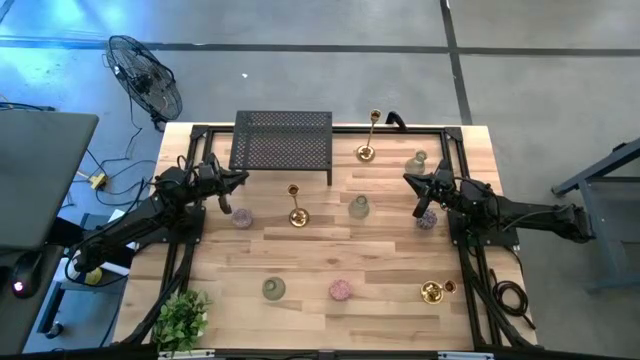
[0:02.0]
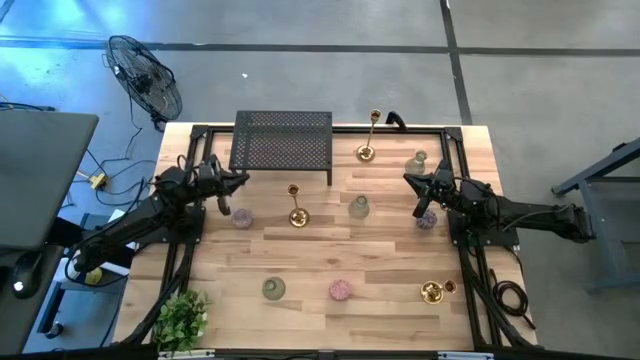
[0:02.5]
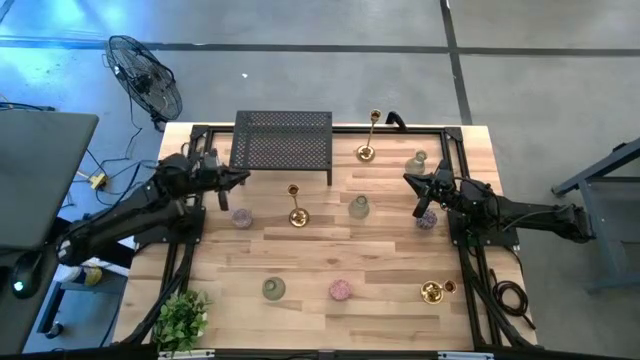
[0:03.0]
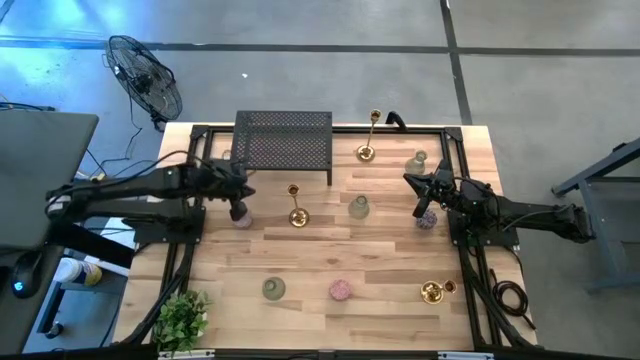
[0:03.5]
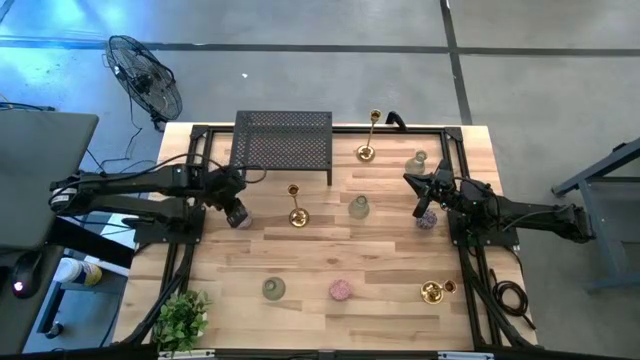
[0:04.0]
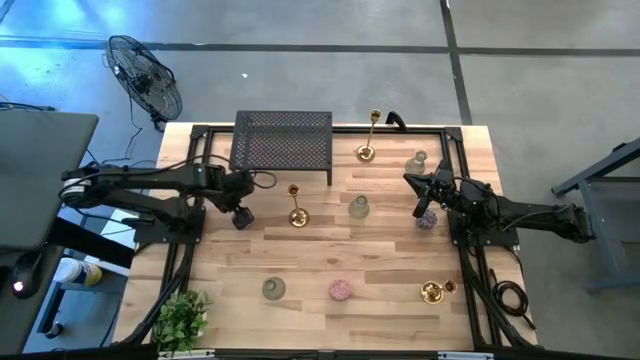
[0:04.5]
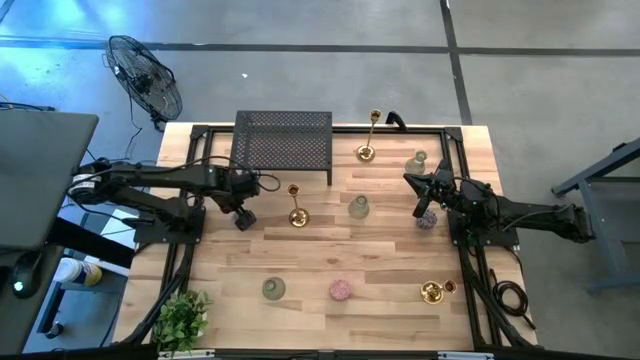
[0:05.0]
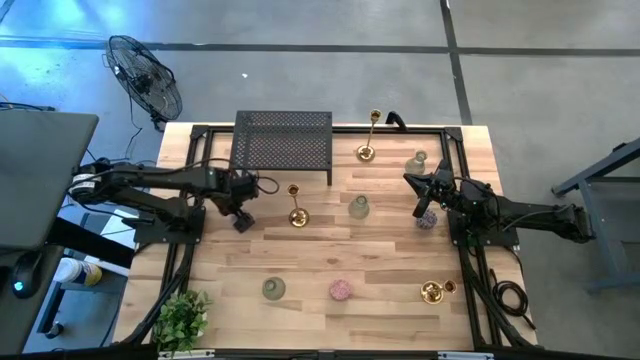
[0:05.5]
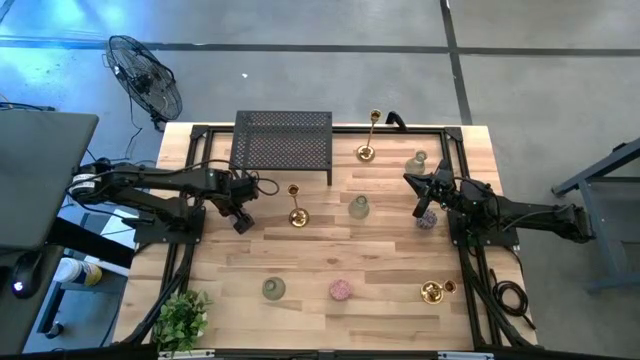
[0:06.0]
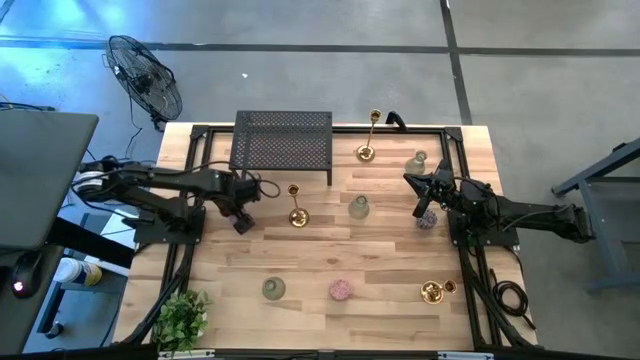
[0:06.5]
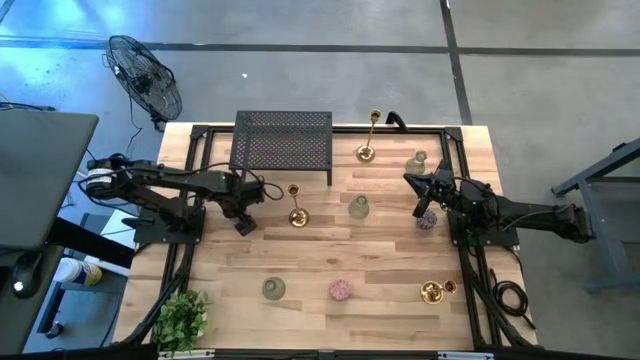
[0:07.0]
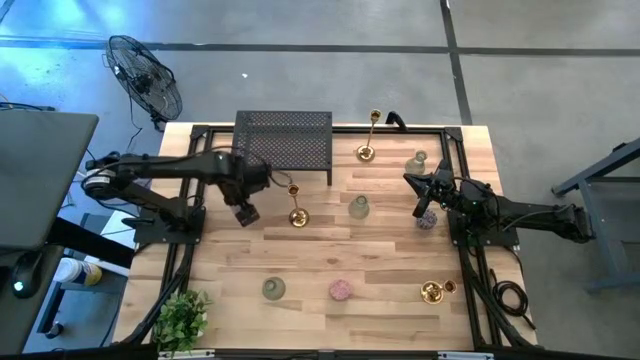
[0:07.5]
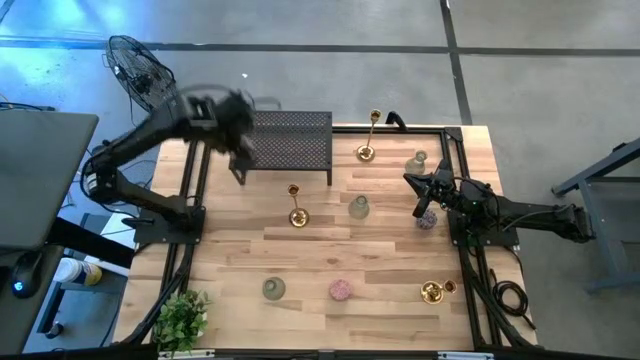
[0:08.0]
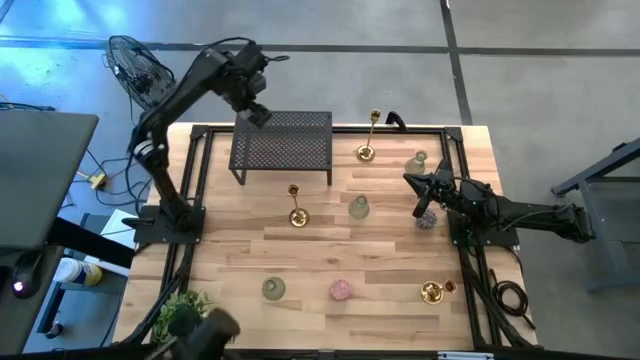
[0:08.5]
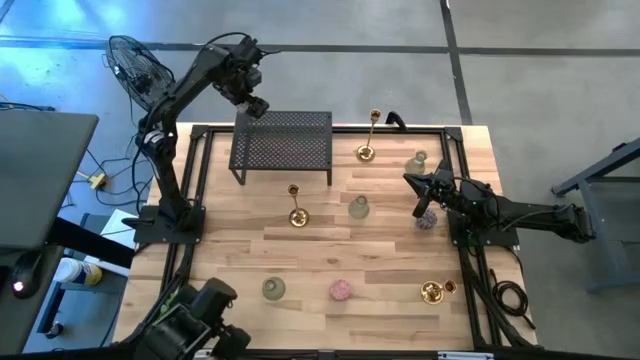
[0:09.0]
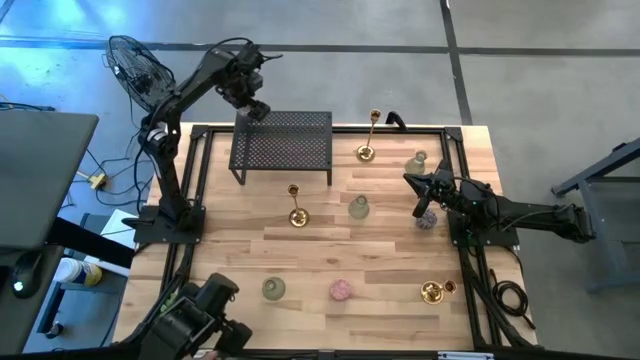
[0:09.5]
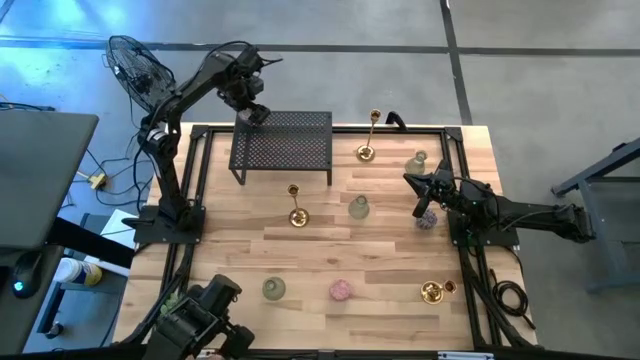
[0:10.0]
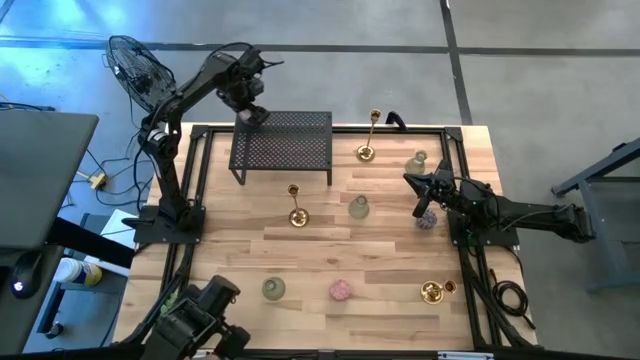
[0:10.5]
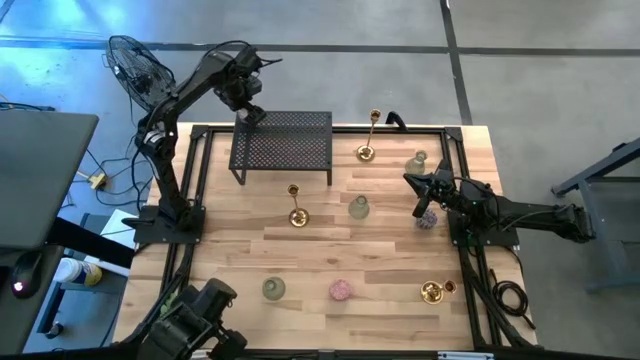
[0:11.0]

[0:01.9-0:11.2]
Task: Pick & Place candle stick holders
Put the red scented candle on the shelf

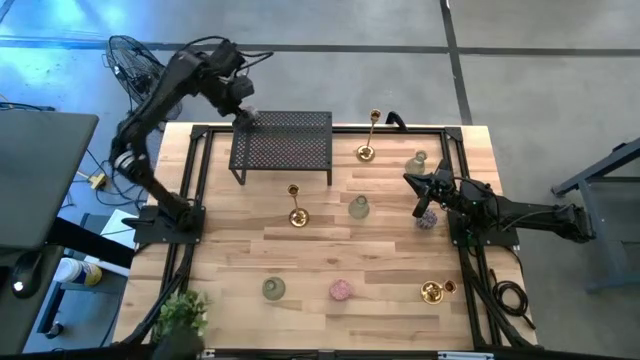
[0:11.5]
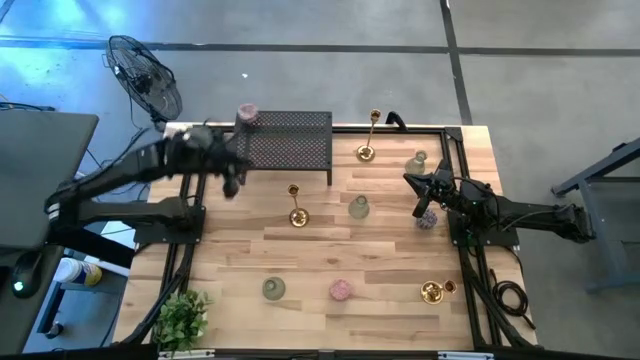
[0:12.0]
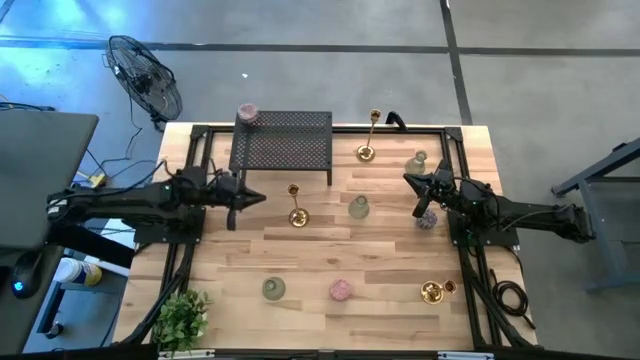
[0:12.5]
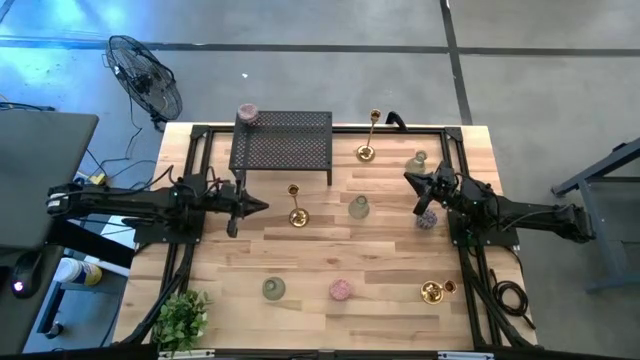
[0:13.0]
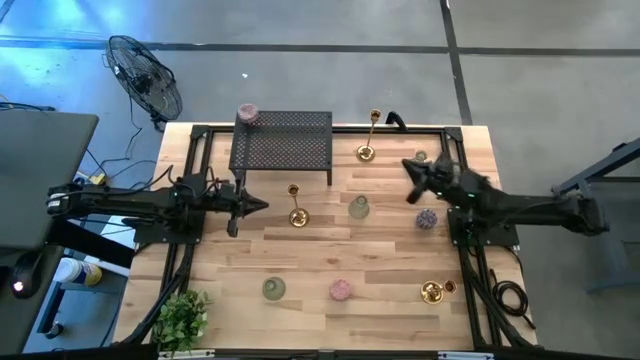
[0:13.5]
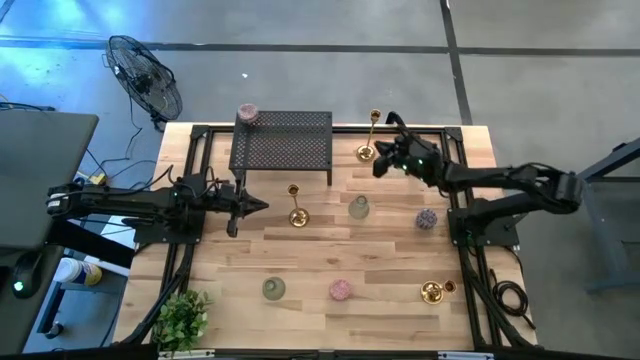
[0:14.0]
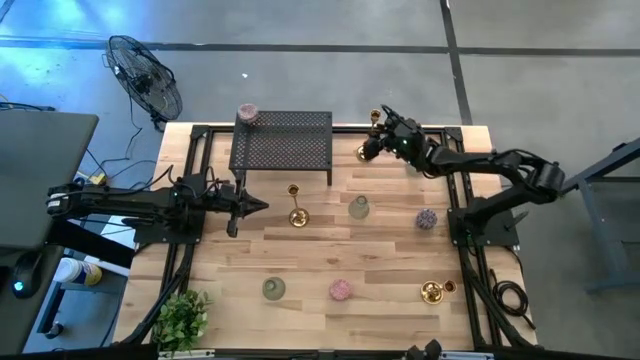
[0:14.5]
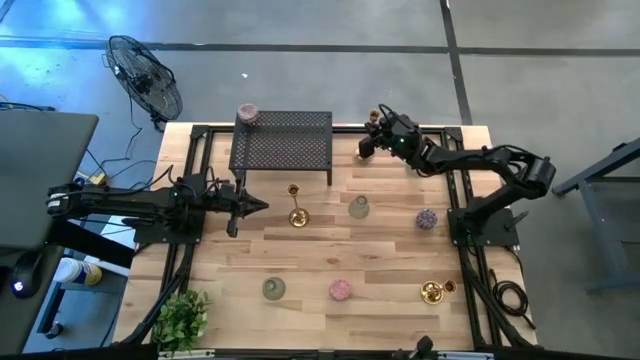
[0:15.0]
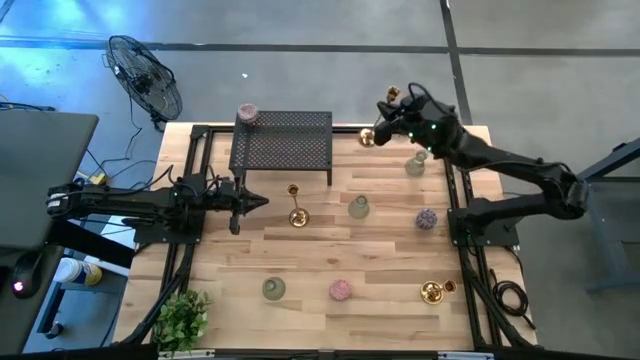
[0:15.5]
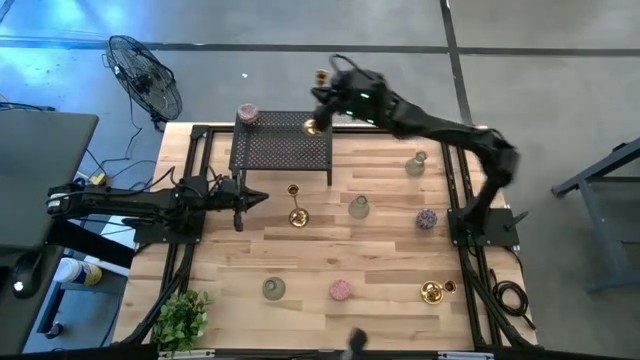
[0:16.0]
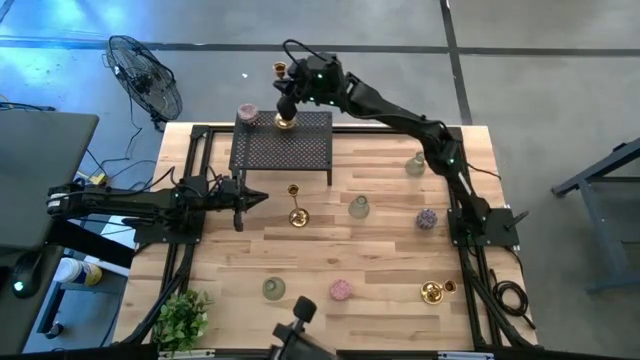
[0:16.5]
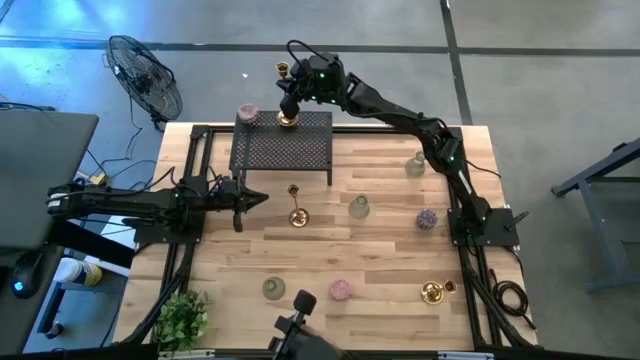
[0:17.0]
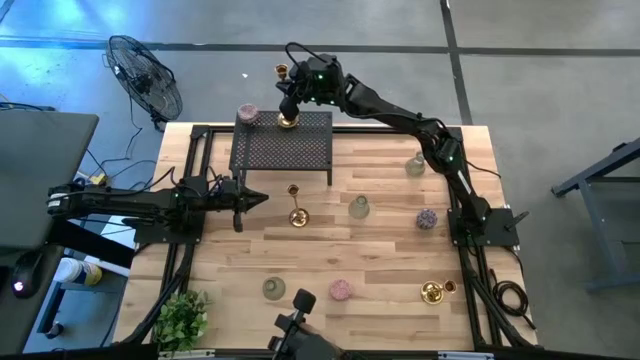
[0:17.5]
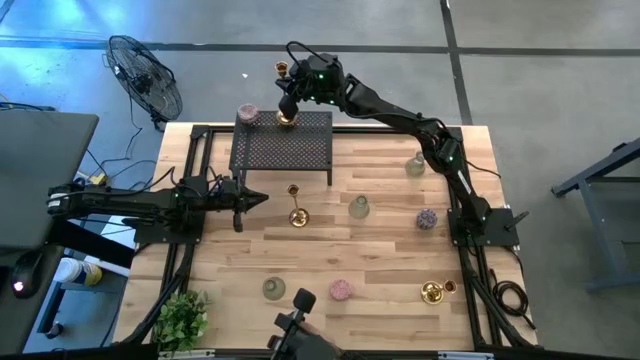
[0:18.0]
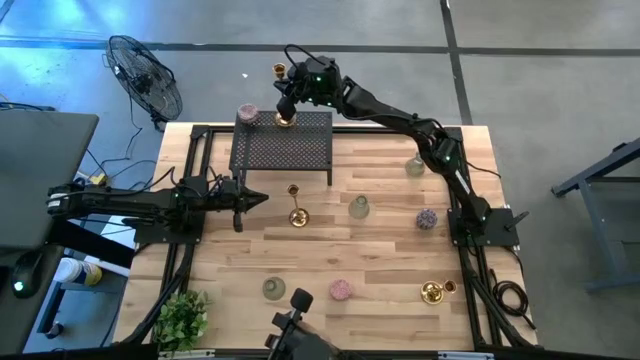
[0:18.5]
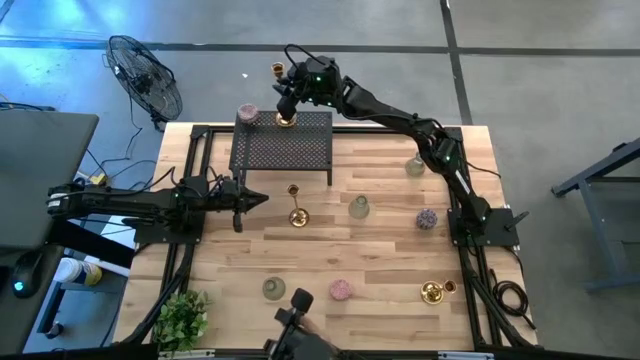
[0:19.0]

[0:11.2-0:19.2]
Put the top gold candle holder on the shelf

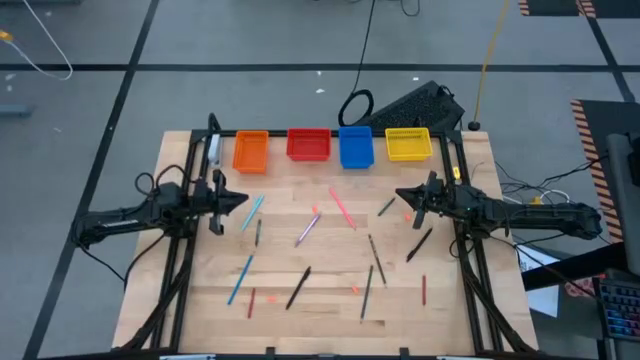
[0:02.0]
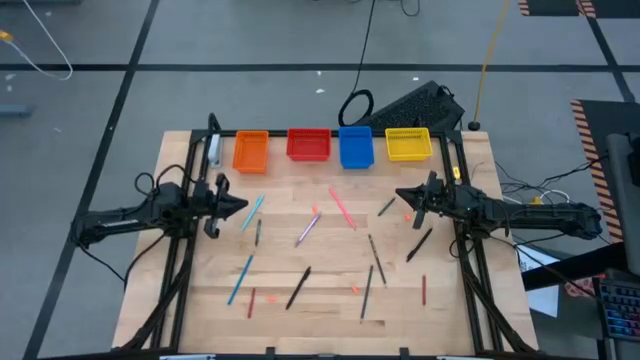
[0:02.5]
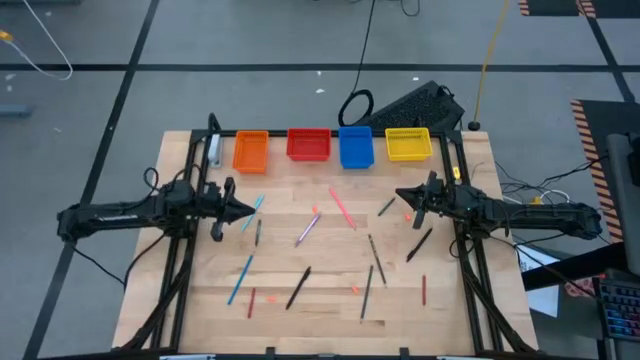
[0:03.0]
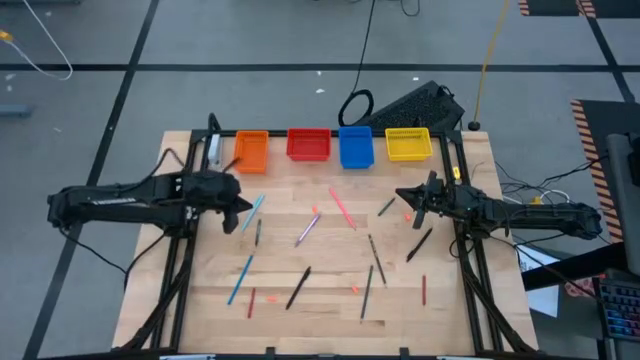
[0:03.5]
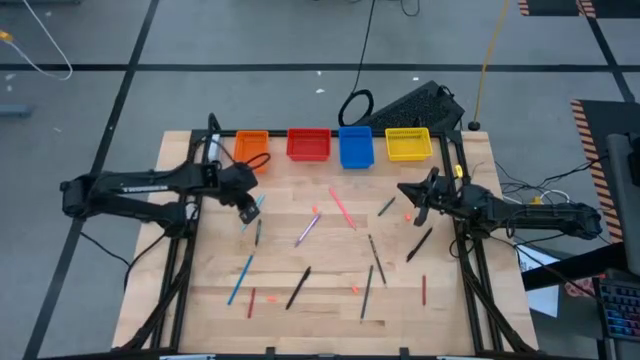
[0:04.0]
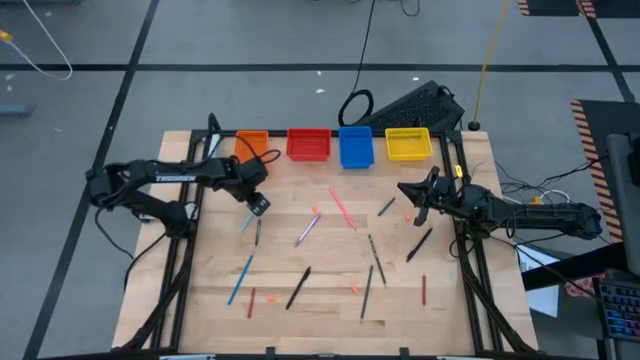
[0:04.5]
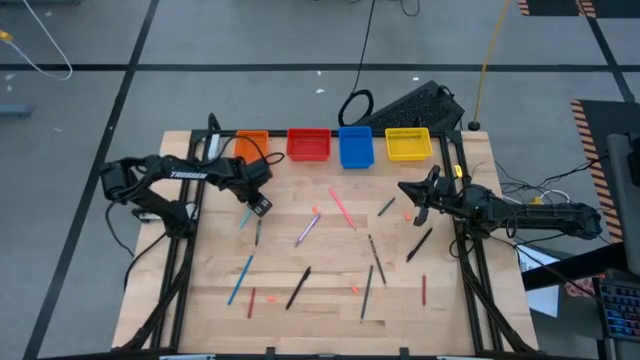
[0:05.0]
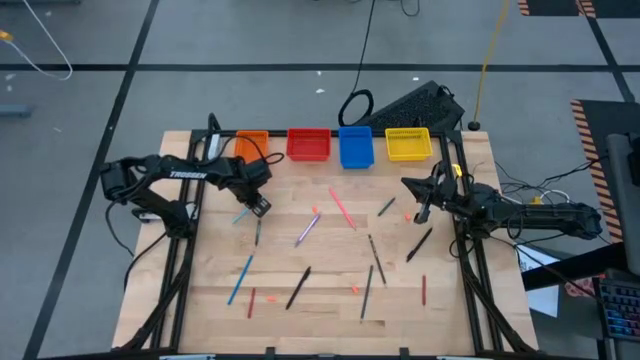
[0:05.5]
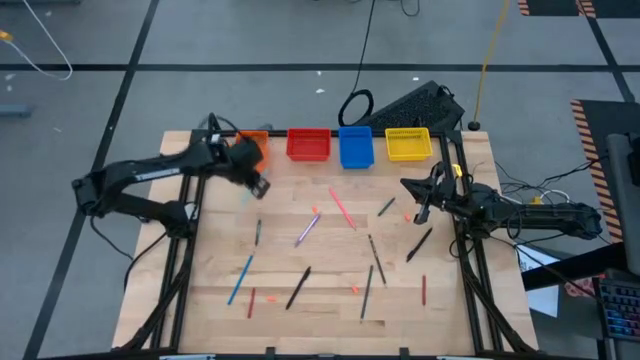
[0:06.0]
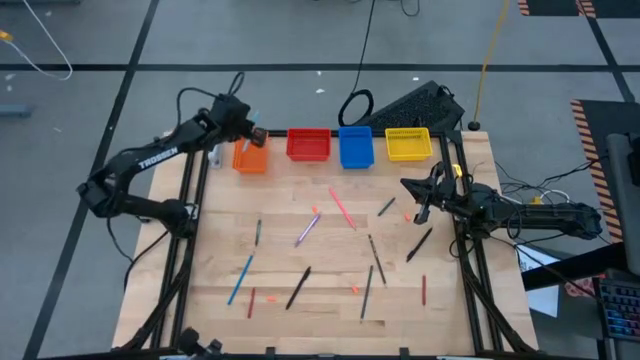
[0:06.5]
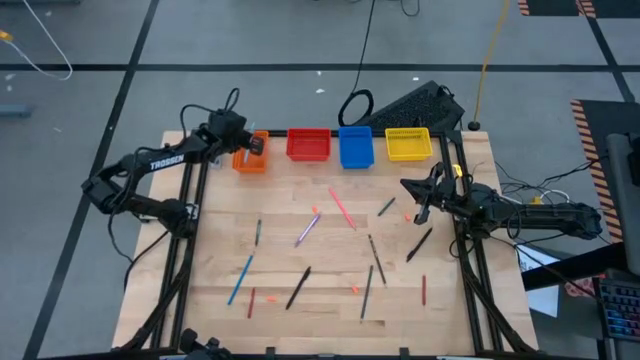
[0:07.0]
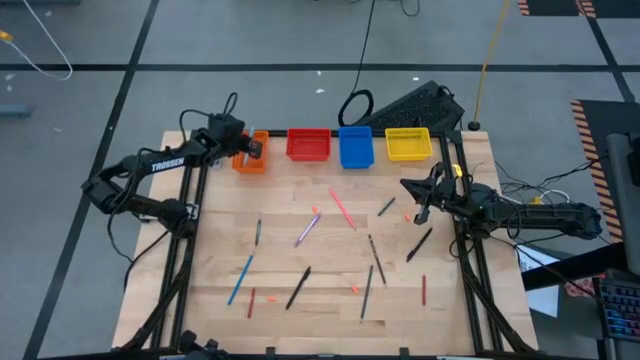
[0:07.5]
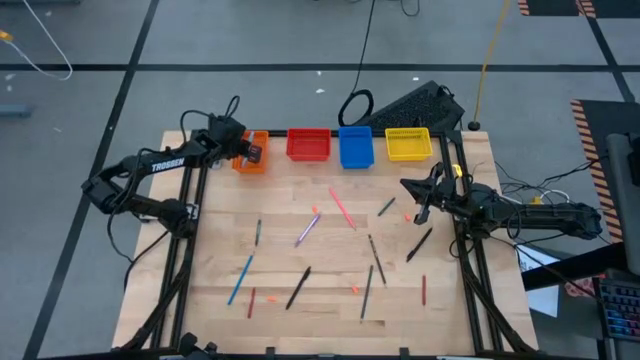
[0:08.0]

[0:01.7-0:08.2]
Task: Sort crayons/erasers/pens/pencils in bins
Put the light blue pen into the orange basket
